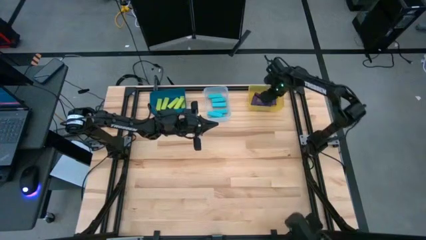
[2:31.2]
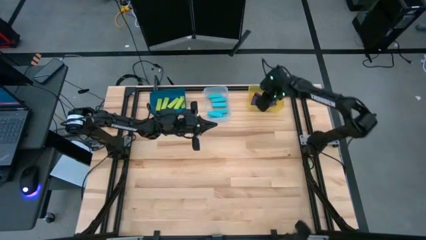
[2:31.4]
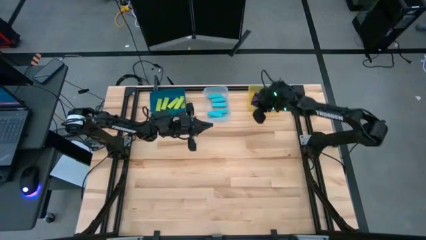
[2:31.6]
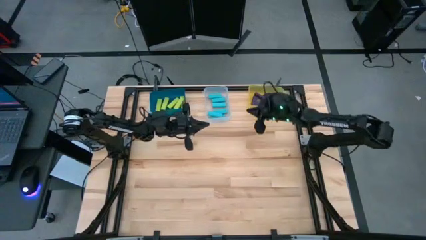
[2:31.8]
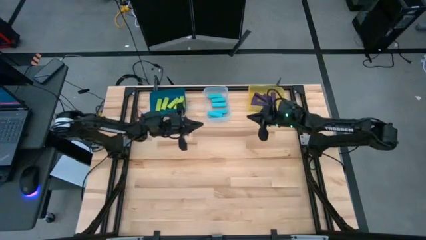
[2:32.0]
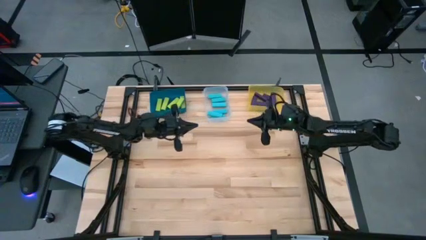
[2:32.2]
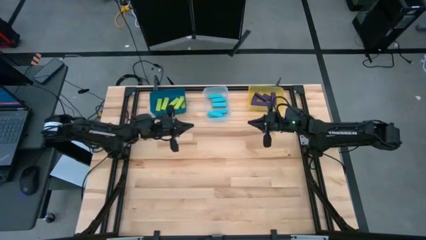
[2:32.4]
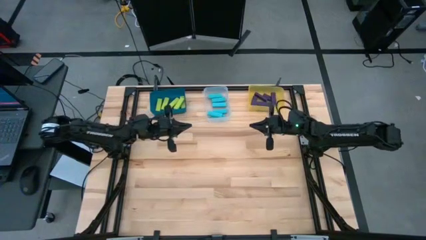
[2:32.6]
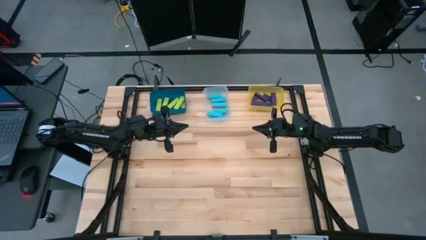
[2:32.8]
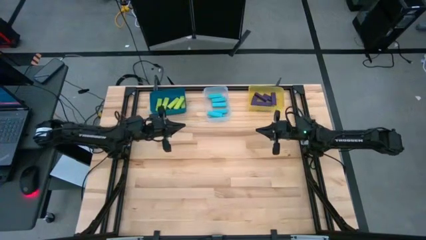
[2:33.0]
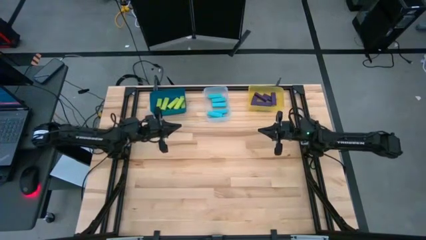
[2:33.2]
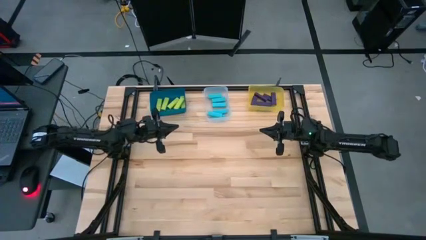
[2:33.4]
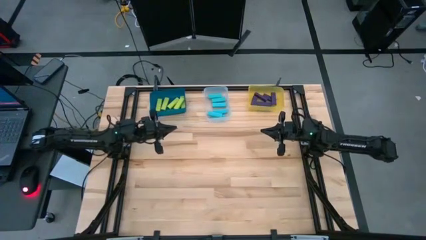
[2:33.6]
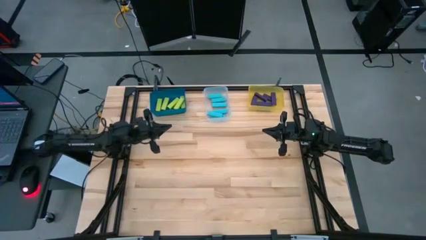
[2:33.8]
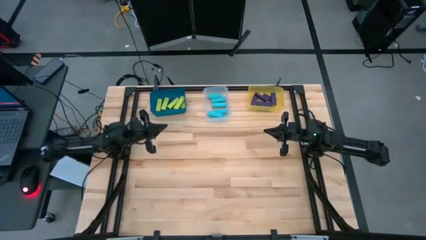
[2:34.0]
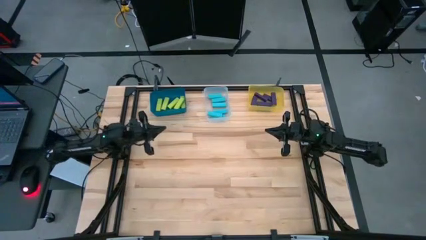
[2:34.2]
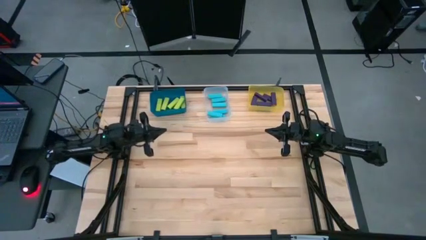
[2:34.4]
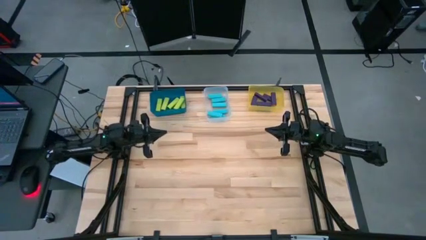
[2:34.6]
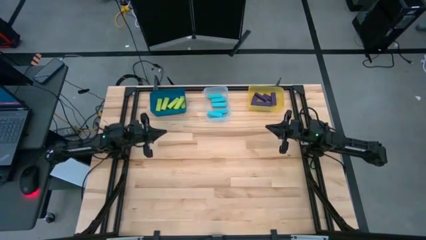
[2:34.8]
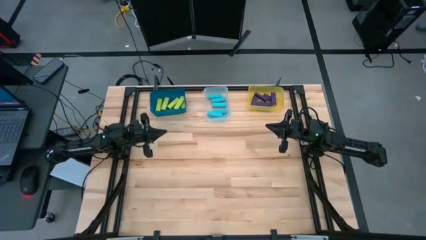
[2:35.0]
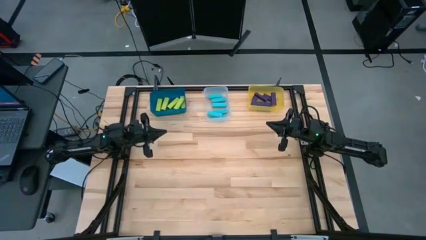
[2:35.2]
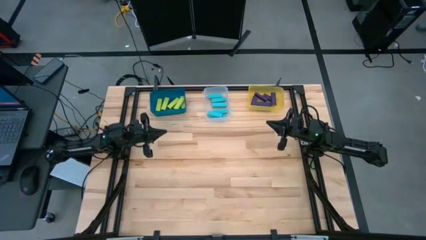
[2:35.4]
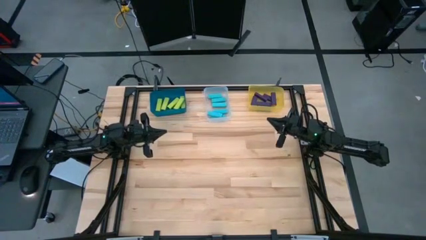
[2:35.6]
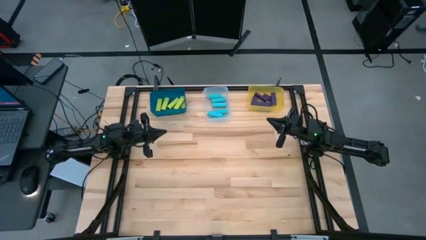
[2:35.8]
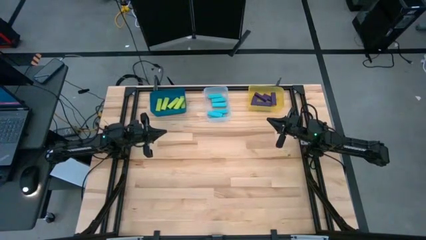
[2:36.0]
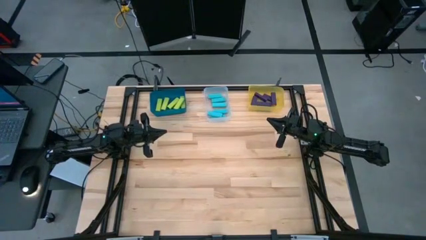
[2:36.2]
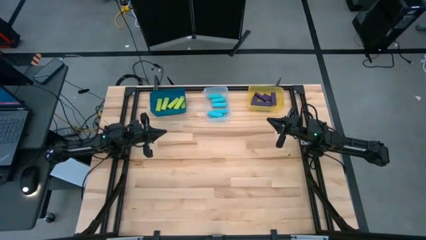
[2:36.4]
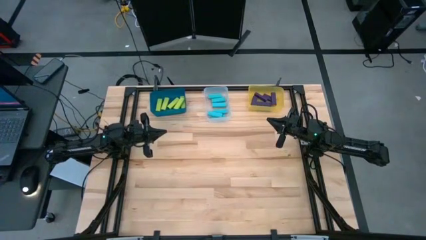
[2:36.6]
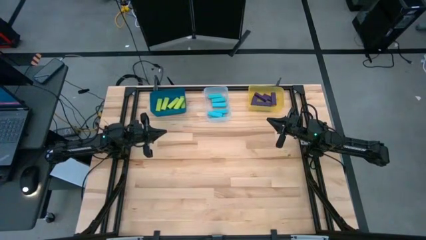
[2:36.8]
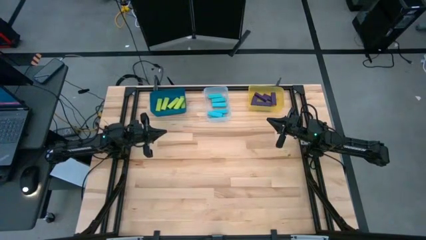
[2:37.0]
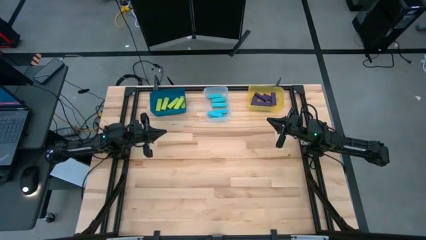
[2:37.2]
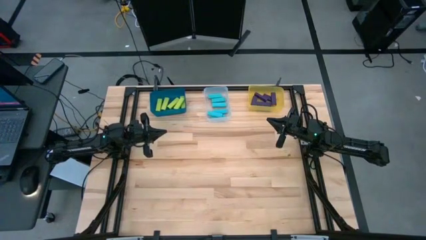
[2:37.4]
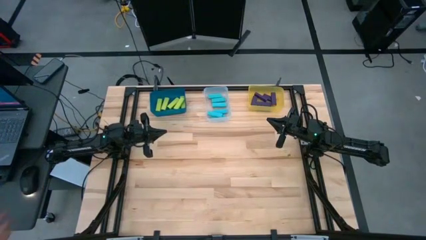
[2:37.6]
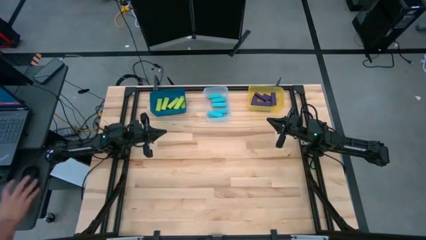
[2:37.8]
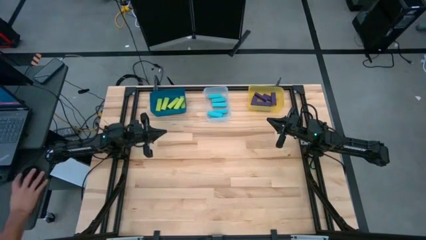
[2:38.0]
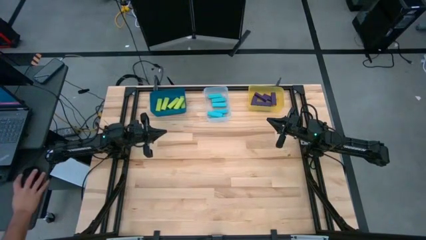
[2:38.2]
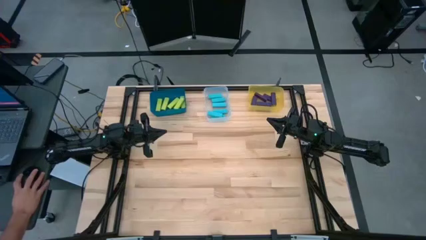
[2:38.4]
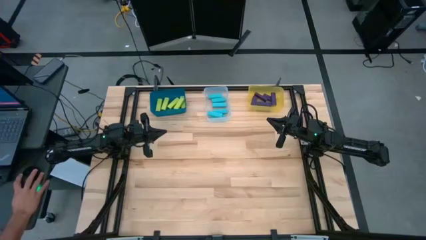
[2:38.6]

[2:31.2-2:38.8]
Task: Sort blocks
Return to Home Position
